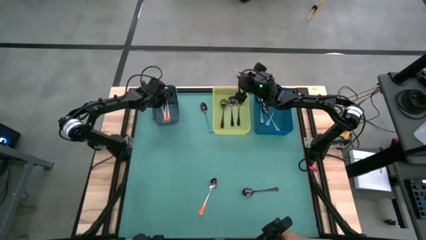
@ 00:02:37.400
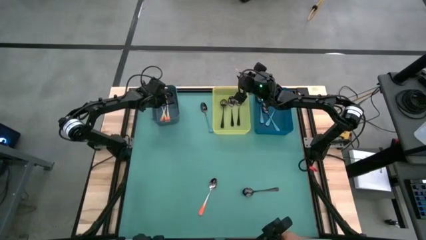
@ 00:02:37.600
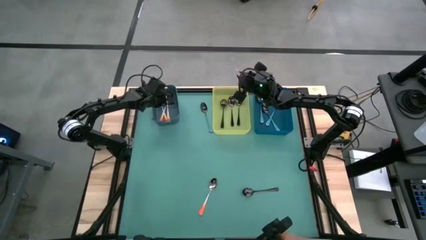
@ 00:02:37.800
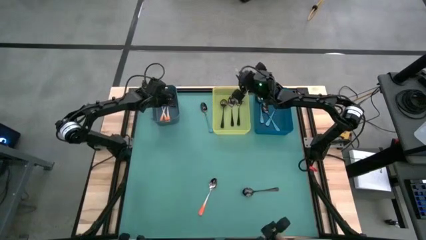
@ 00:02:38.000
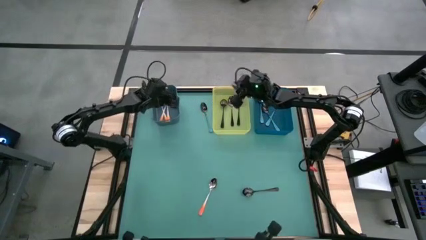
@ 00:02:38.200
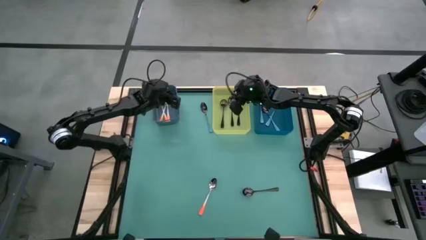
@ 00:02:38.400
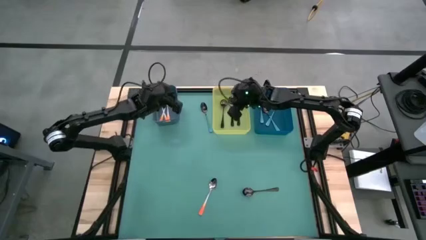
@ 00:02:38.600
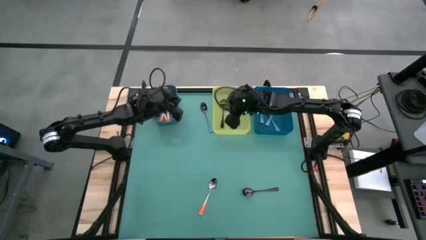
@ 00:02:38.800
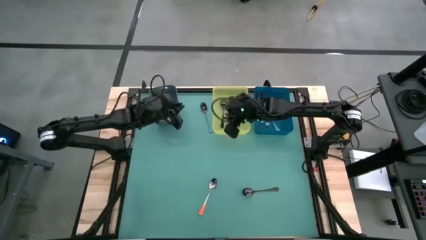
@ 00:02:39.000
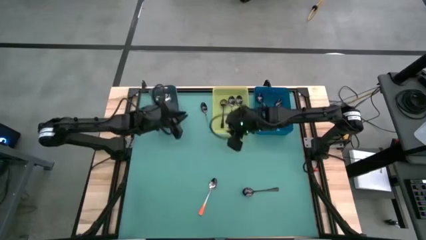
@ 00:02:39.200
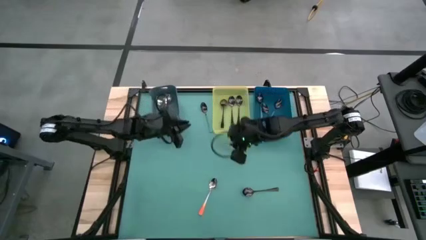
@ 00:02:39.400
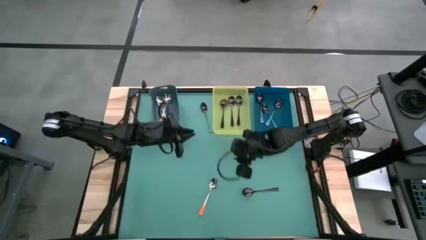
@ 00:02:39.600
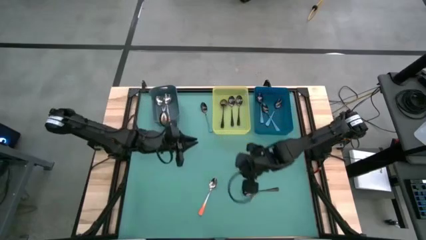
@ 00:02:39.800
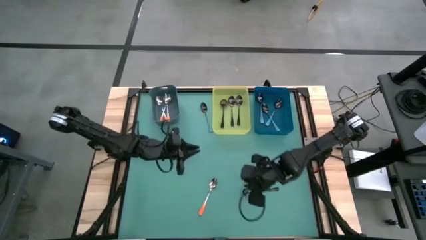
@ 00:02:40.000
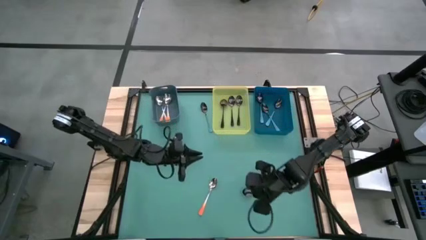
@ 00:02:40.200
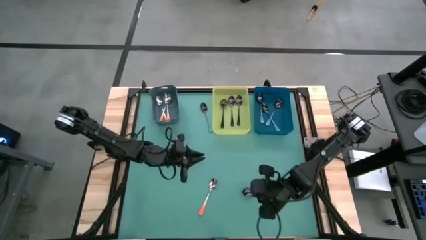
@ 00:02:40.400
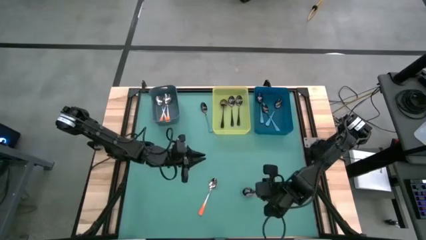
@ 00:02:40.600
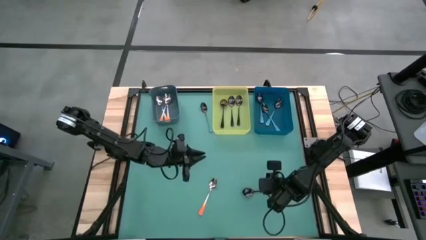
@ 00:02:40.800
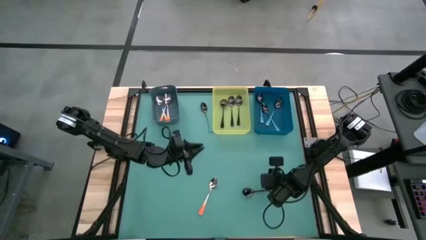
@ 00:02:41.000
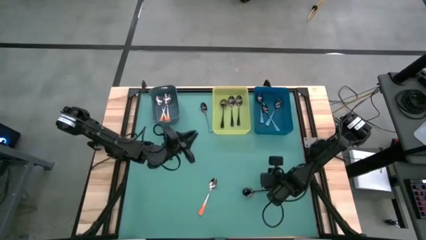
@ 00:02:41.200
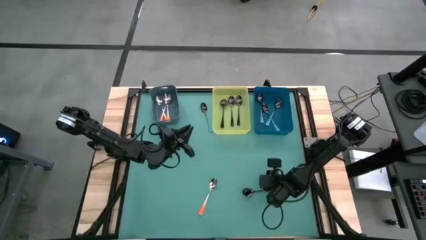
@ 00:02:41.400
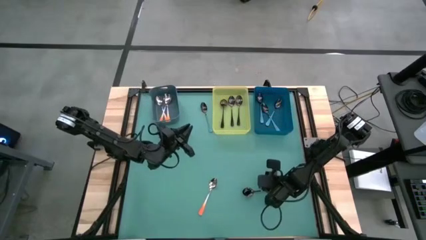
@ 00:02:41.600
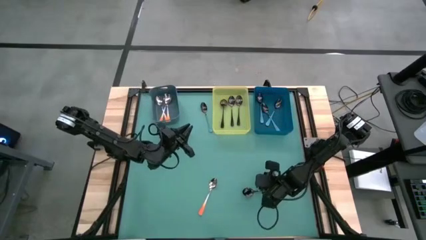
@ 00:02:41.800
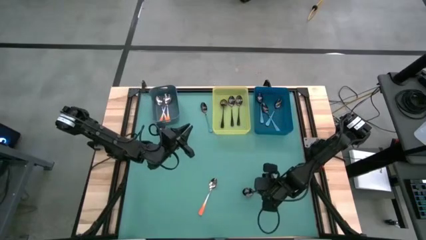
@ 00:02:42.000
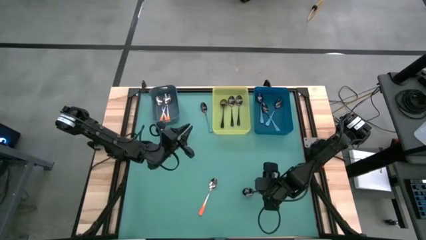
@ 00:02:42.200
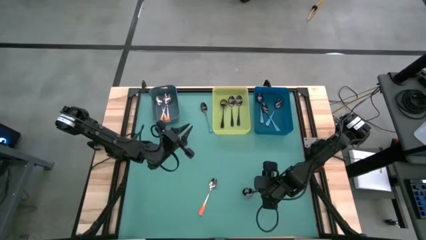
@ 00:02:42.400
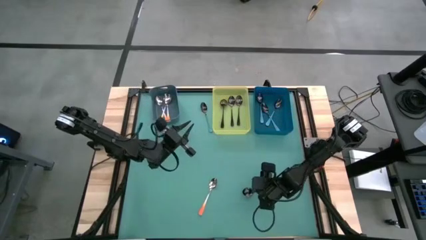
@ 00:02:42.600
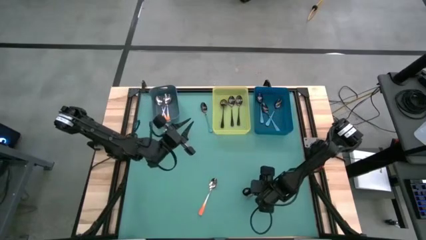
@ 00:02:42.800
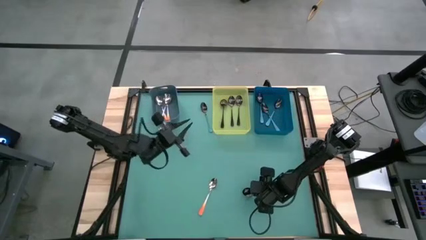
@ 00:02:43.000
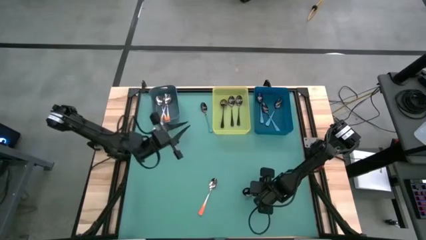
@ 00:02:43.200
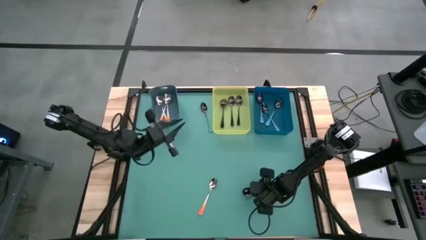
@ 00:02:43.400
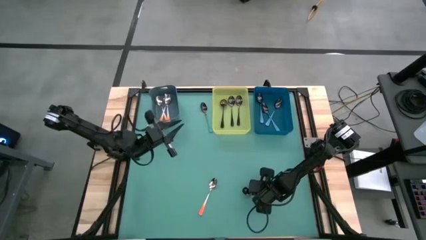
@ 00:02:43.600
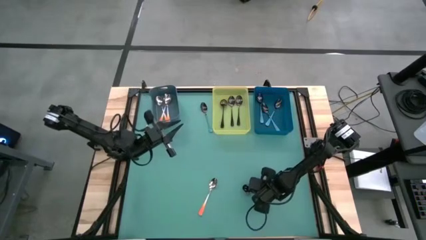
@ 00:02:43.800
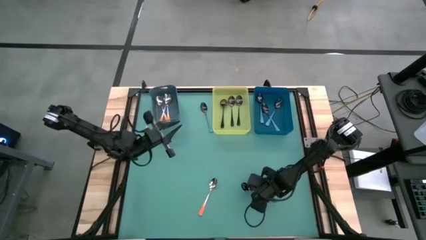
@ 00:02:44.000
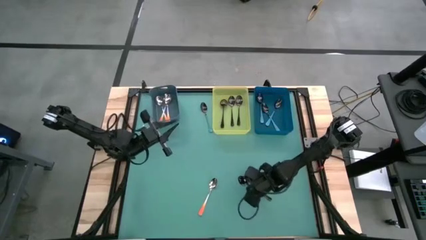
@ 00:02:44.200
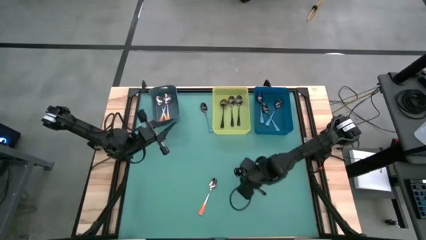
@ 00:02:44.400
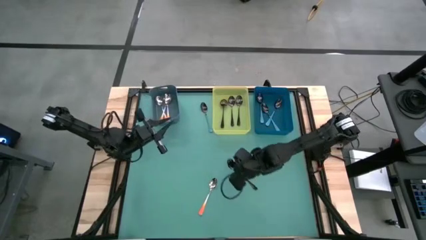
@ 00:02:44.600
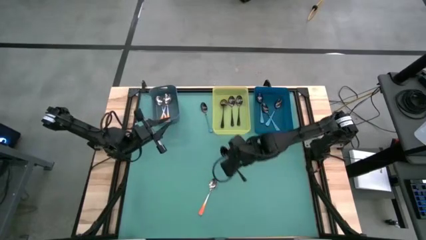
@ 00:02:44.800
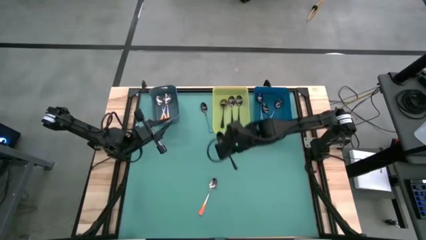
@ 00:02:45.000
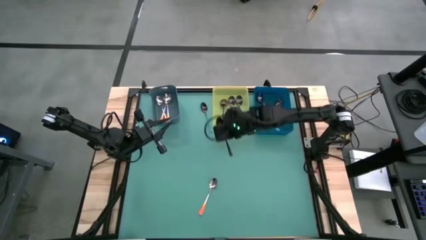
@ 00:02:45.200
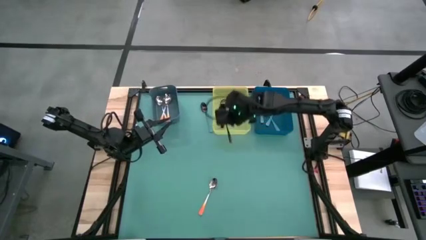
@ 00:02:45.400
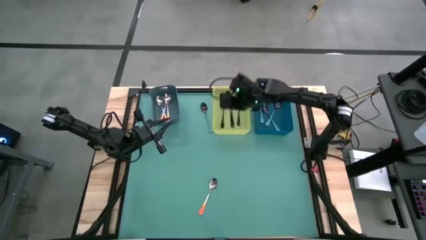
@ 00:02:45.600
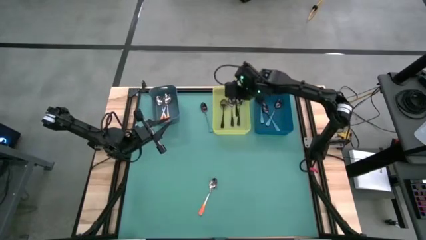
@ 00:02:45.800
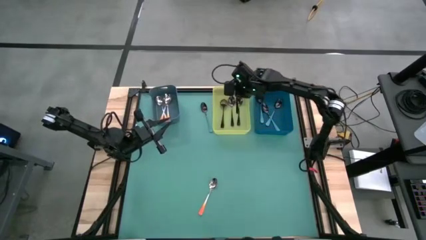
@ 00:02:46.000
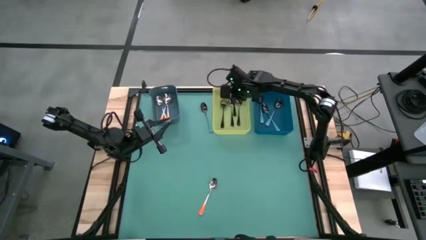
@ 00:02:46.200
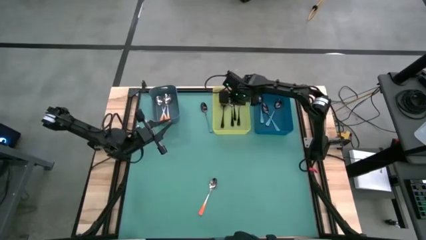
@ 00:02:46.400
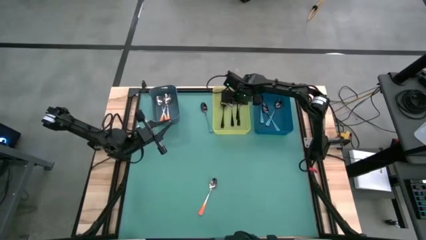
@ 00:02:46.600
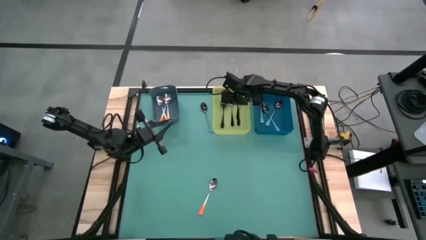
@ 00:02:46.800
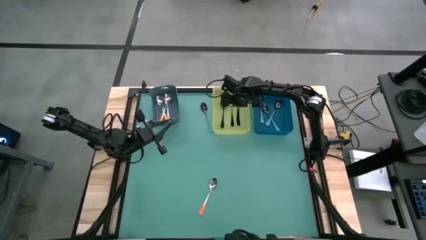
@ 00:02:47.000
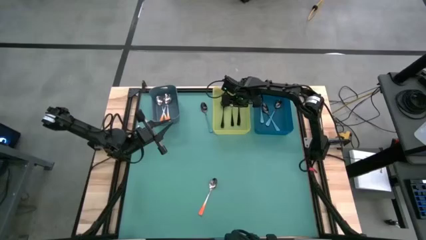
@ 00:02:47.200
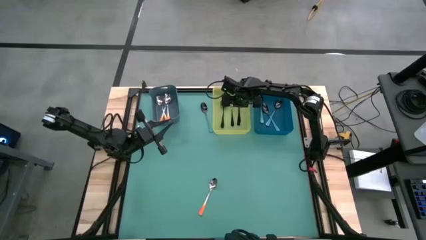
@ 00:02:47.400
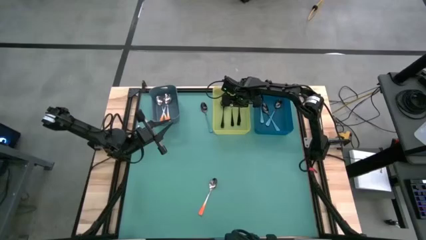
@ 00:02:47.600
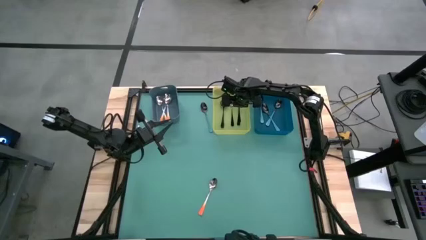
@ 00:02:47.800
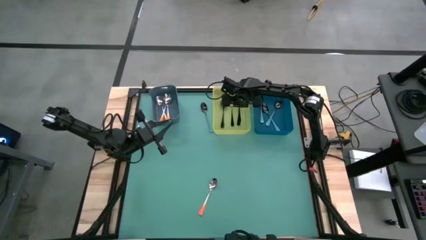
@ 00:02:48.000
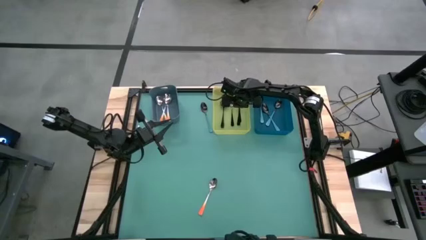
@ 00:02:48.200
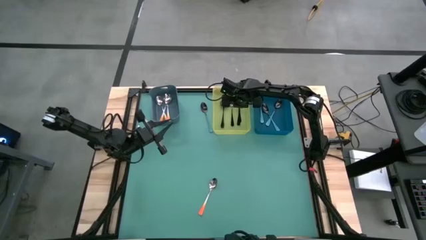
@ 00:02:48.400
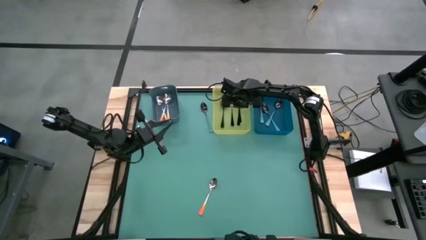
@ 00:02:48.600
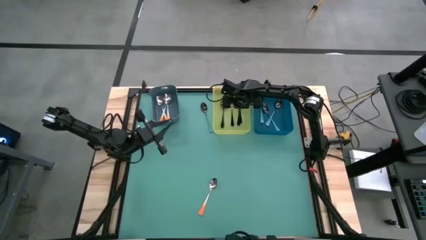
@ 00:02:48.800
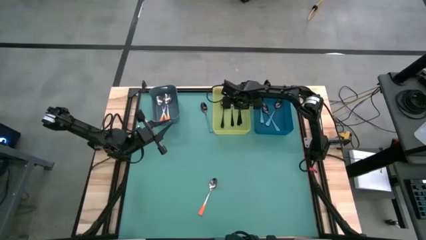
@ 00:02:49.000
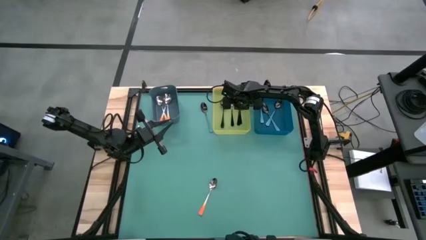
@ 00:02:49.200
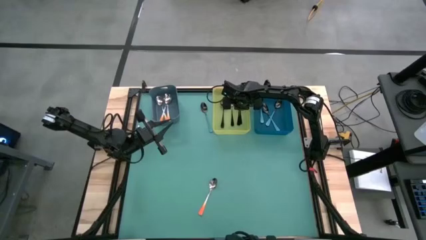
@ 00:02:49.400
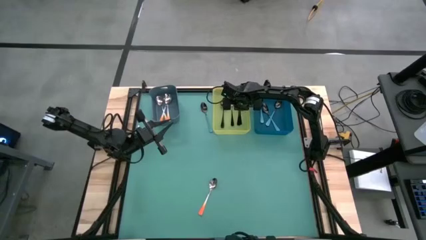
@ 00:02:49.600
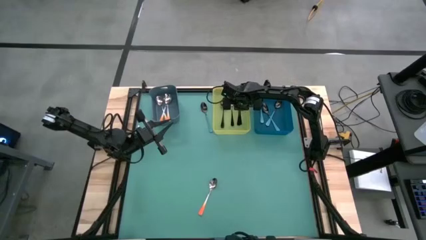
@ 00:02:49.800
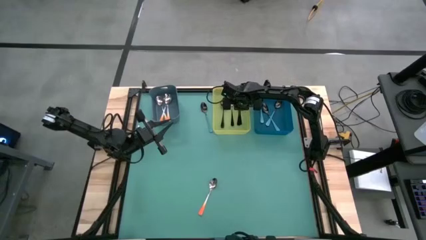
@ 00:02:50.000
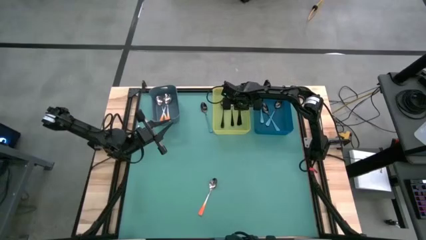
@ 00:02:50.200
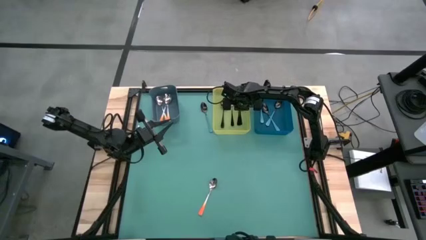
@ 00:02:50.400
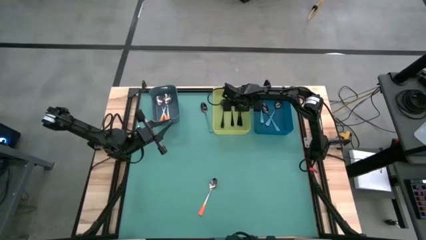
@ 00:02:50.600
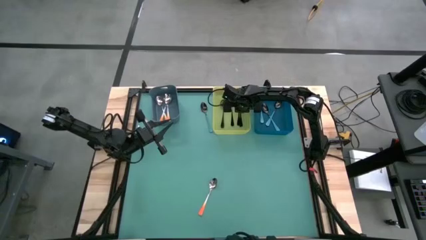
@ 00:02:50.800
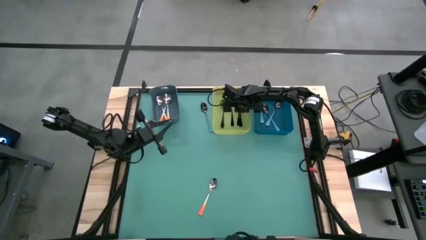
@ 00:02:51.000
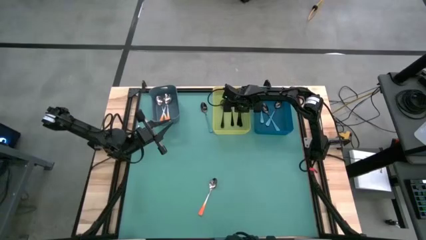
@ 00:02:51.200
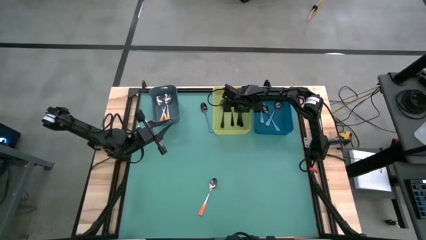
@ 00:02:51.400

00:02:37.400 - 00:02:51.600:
Task: Sort silverware by color (type)
Put the black spoon into the yellow bin

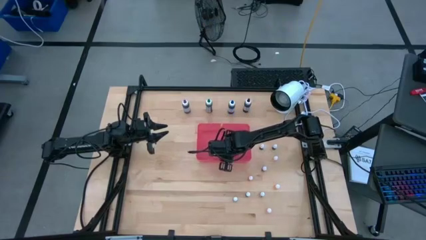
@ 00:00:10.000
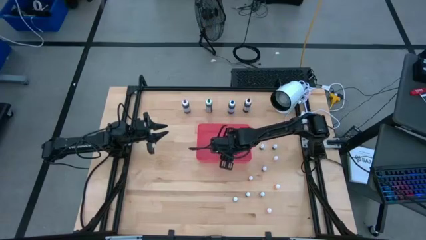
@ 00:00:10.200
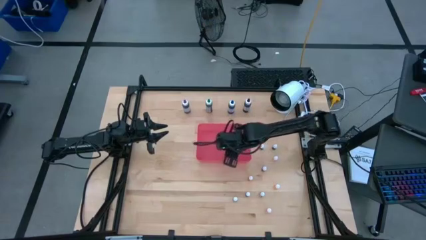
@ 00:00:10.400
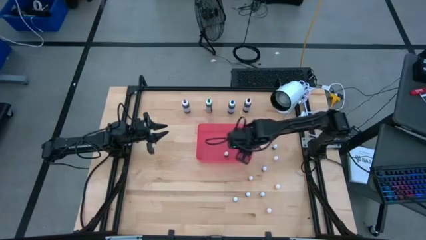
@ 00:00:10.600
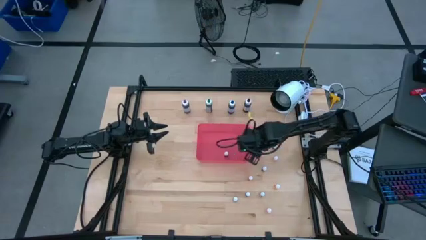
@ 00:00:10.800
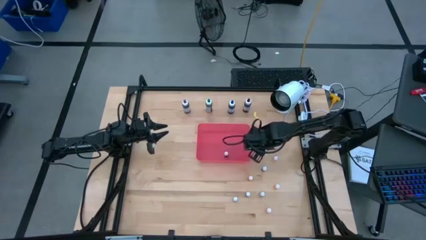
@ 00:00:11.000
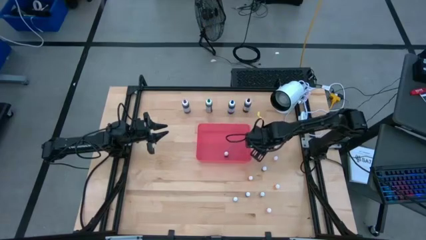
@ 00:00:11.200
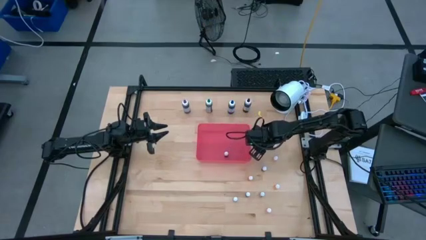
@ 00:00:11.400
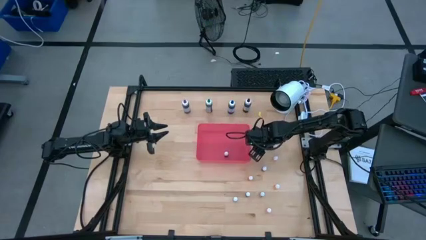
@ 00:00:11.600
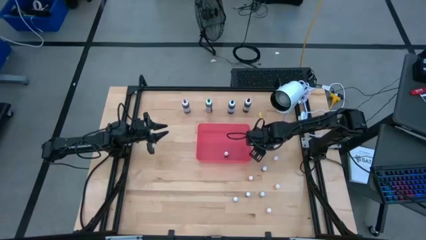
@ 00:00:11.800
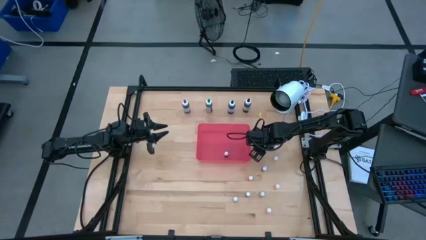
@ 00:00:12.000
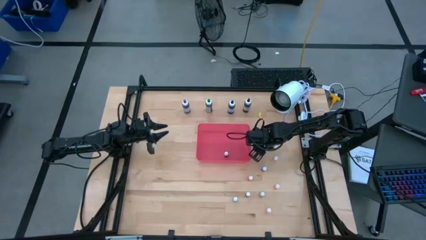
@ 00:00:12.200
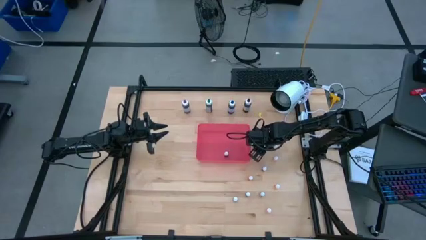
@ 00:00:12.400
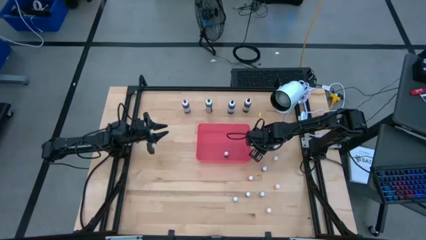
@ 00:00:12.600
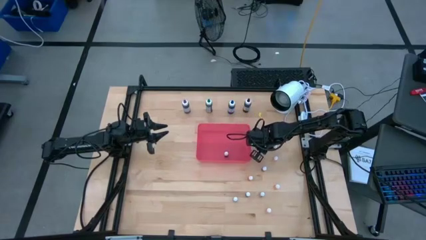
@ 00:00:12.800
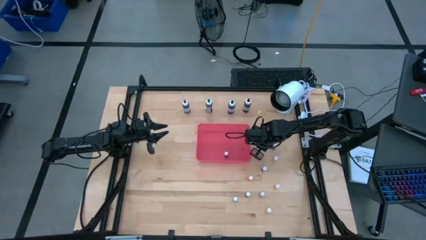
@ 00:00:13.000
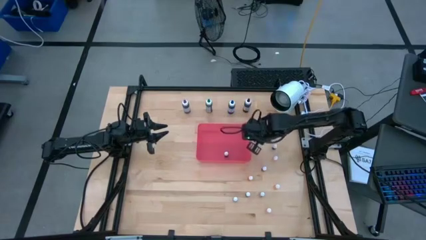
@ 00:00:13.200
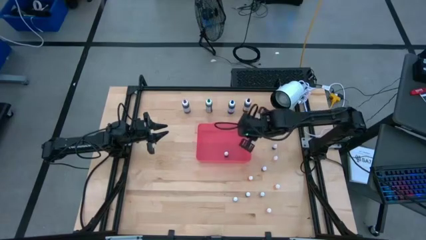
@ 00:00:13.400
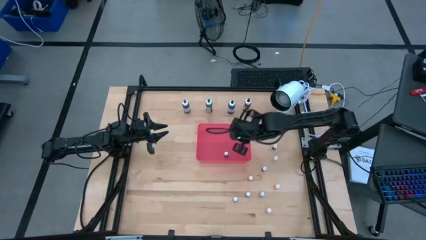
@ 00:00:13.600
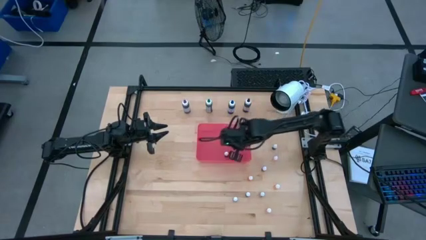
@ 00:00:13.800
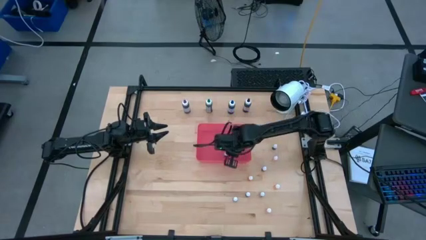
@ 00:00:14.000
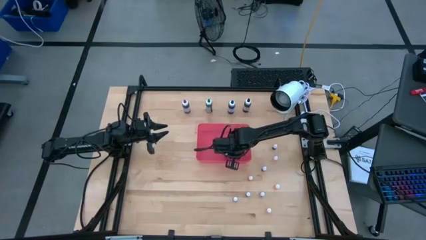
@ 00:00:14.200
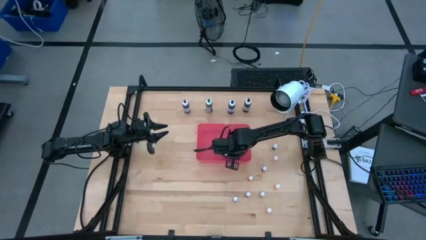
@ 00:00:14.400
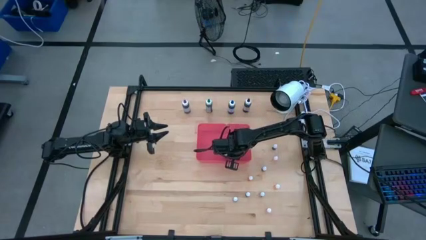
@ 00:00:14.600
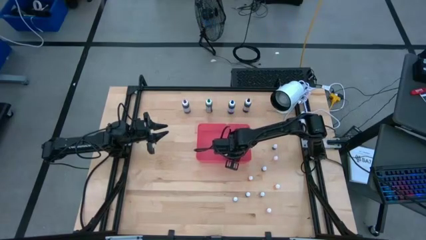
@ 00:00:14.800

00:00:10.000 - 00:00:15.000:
Task: Pick & Place food coloring
Put the small black food coloring bottle into the red bin
